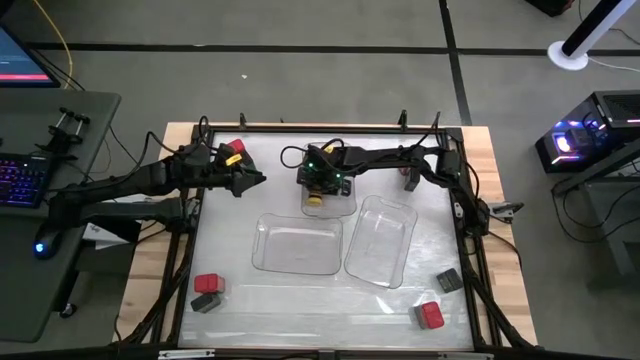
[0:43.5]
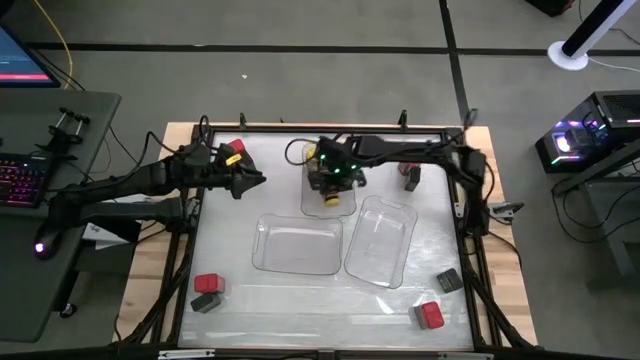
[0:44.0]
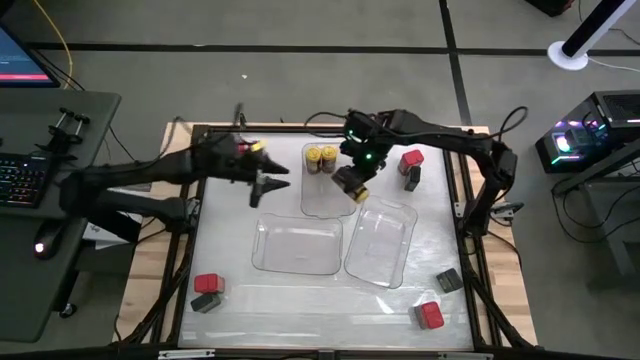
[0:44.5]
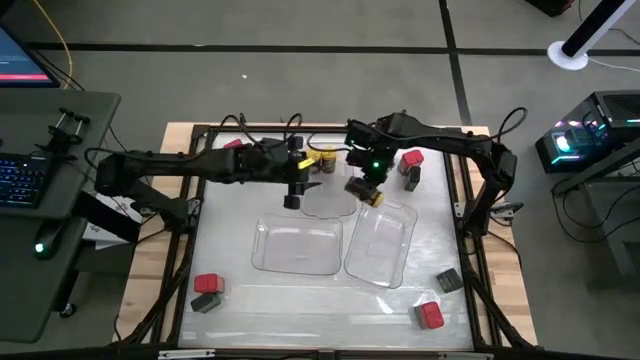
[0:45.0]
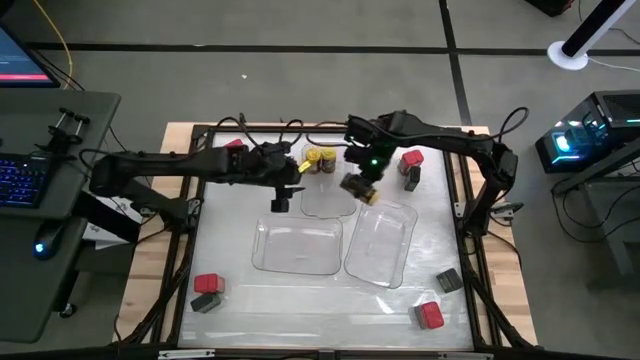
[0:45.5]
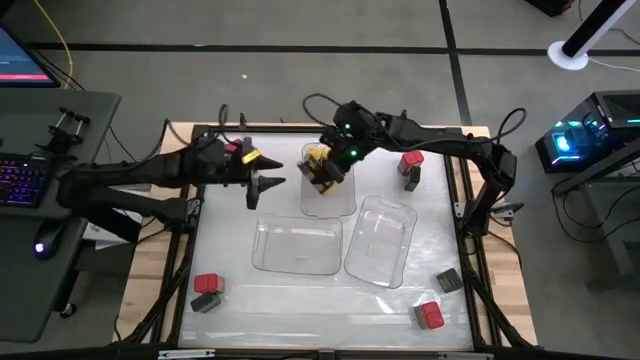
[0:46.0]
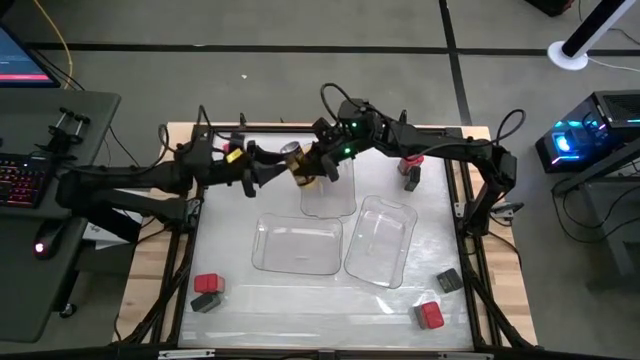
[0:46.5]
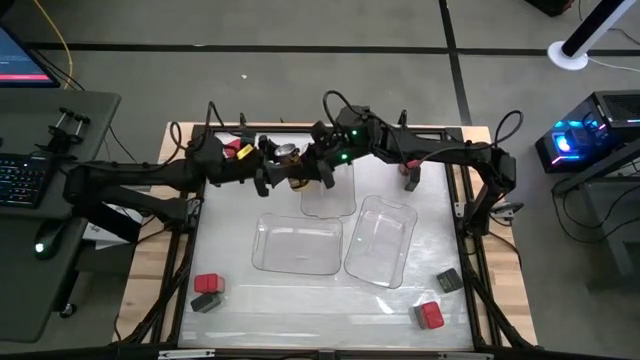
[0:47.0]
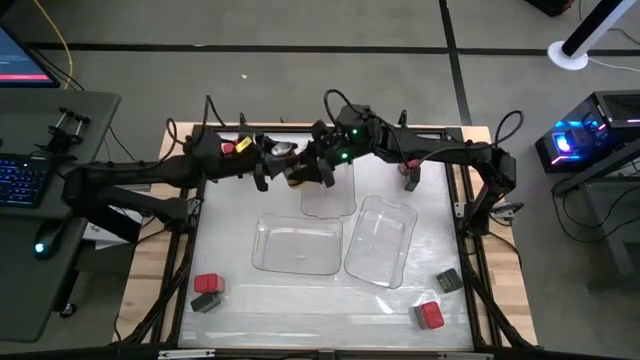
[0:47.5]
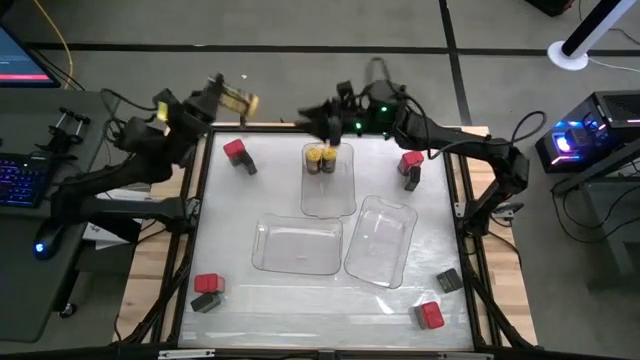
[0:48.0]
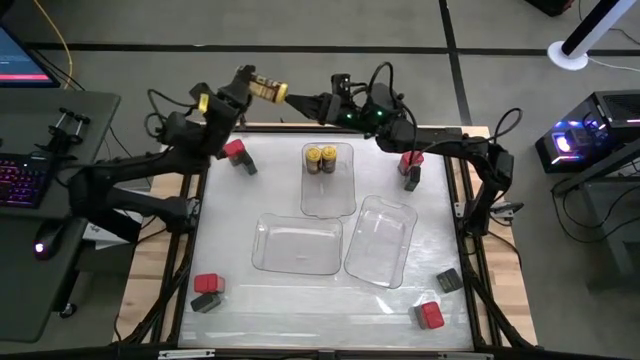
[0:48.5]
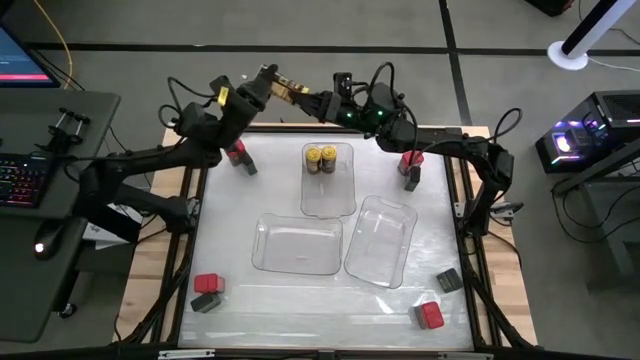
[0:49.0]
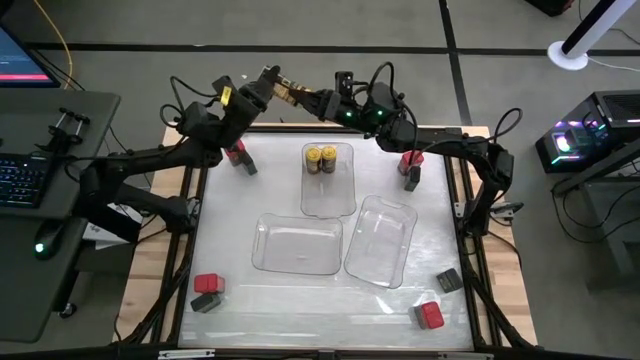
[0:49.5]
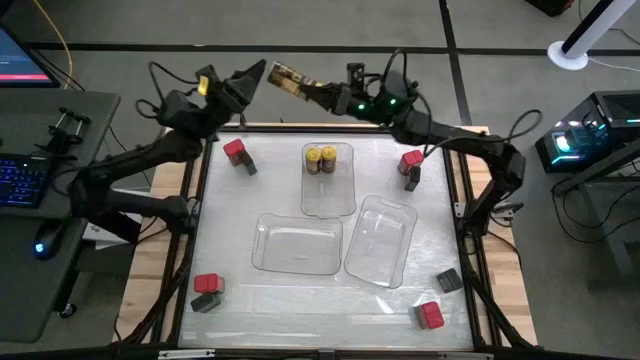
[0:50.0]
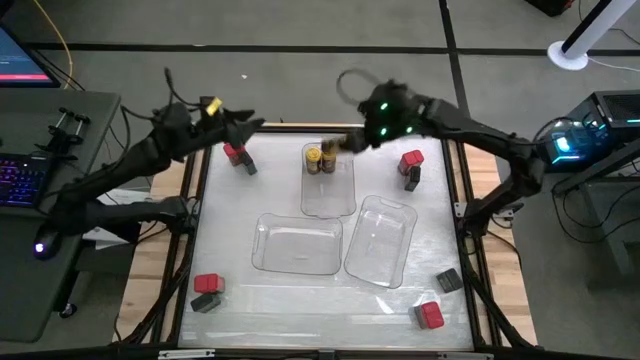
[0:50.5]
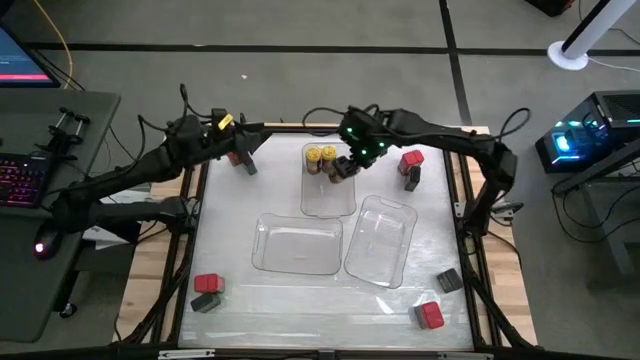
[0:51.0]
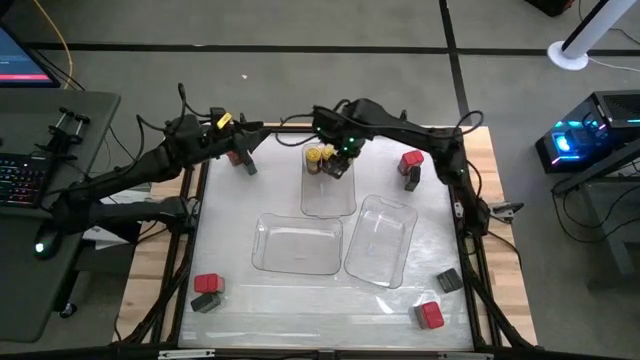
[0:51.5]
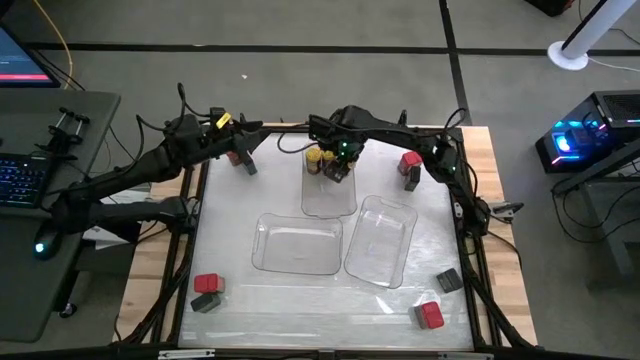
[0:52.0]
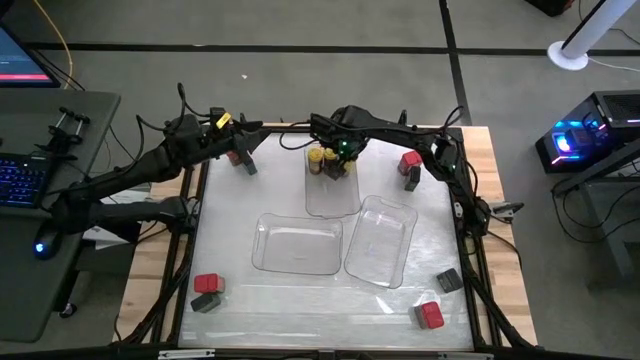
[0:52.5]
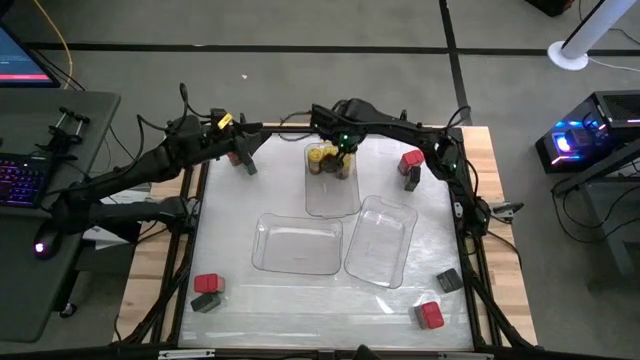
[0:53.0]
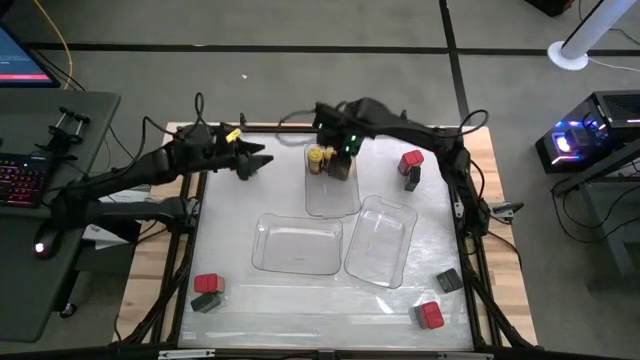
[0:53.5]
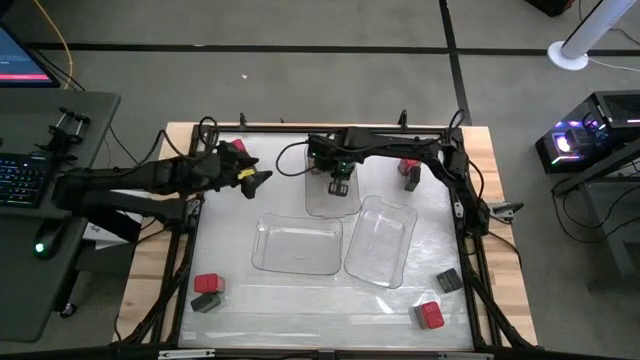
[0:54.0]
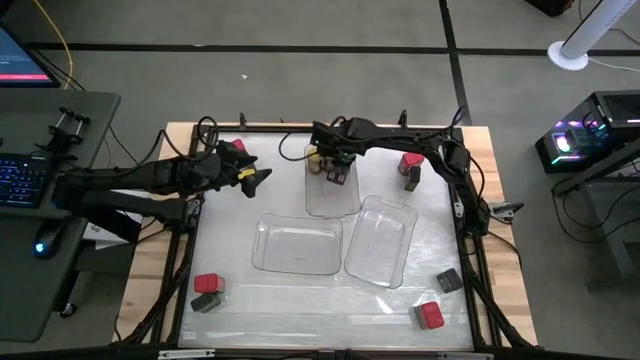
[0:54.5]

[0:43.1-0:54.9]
Task: Sort spices by type
Put the yellow seasoning bottle into the top transparent bin

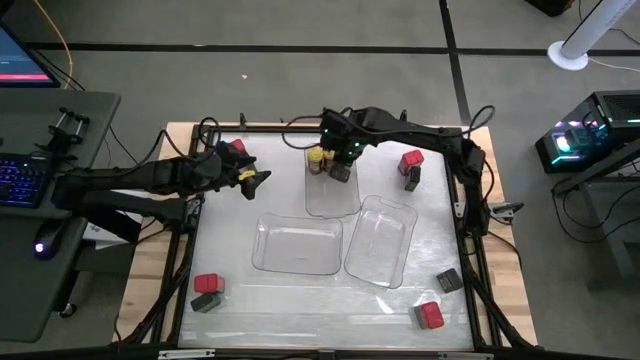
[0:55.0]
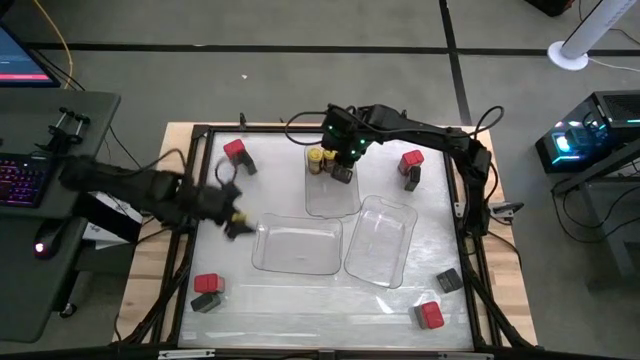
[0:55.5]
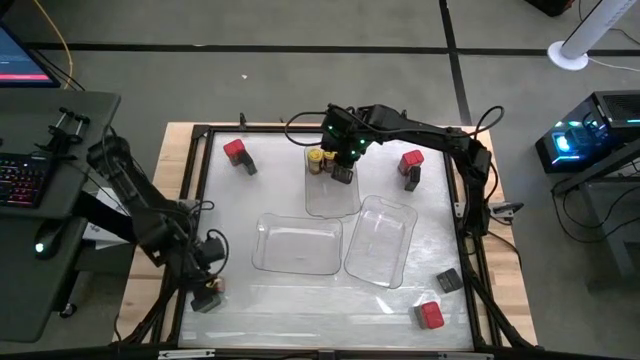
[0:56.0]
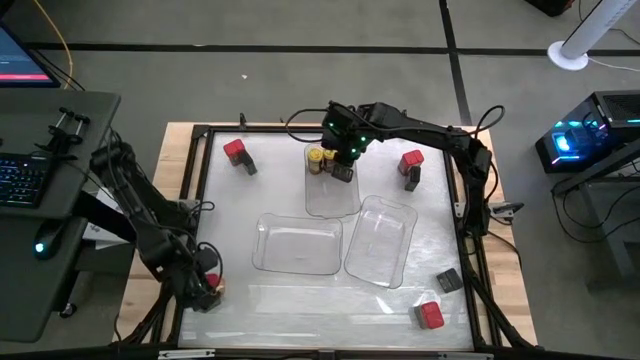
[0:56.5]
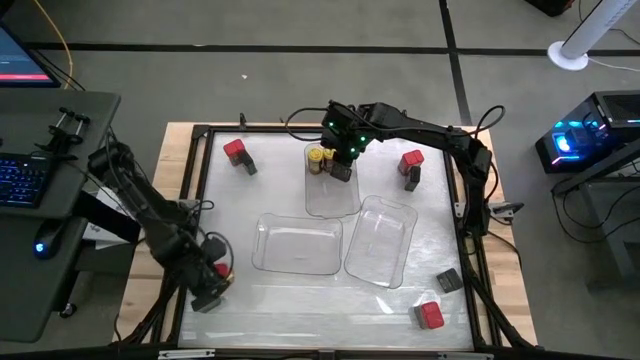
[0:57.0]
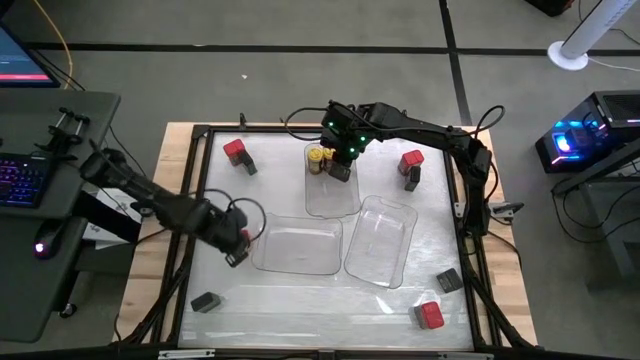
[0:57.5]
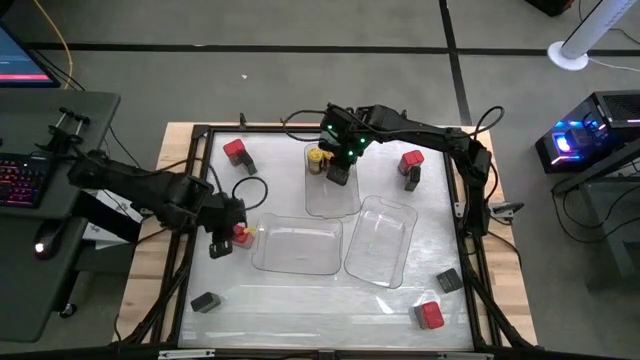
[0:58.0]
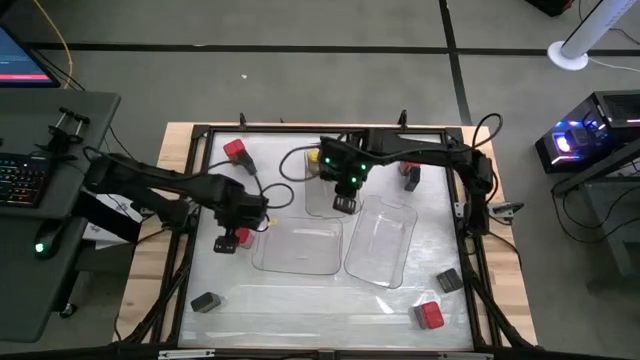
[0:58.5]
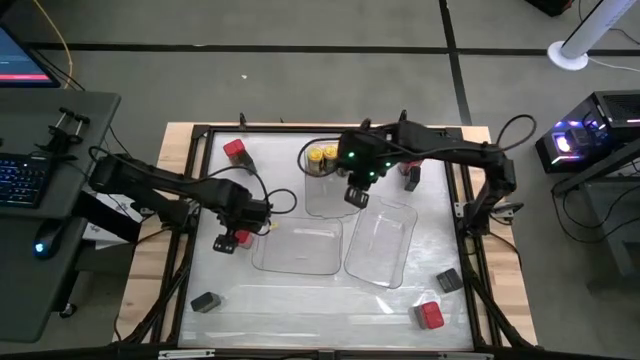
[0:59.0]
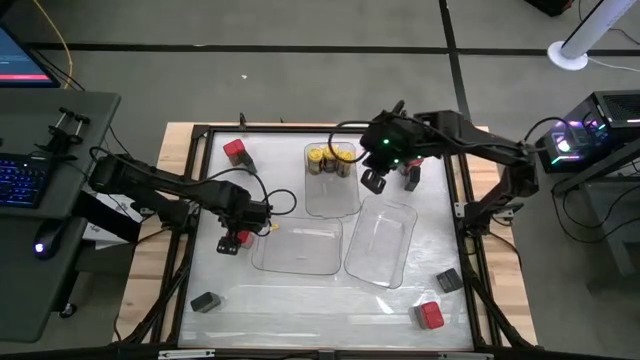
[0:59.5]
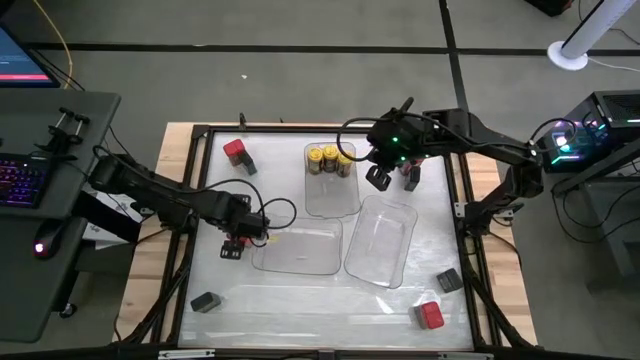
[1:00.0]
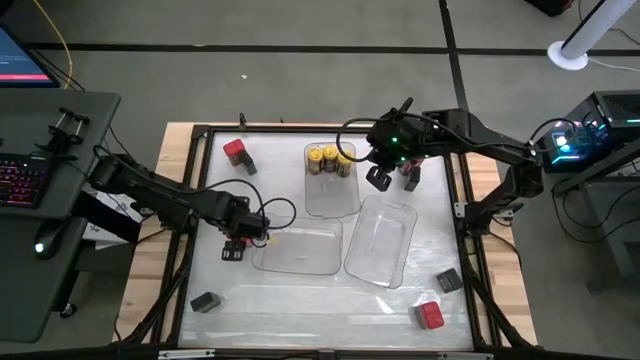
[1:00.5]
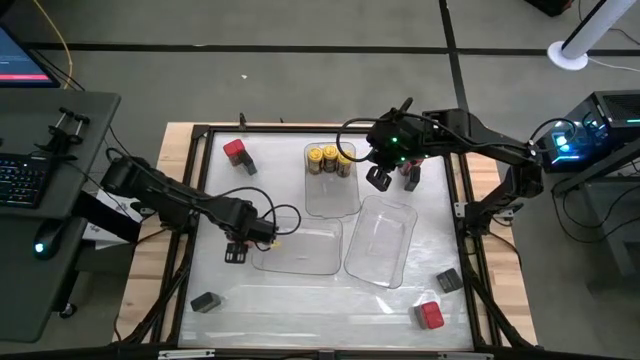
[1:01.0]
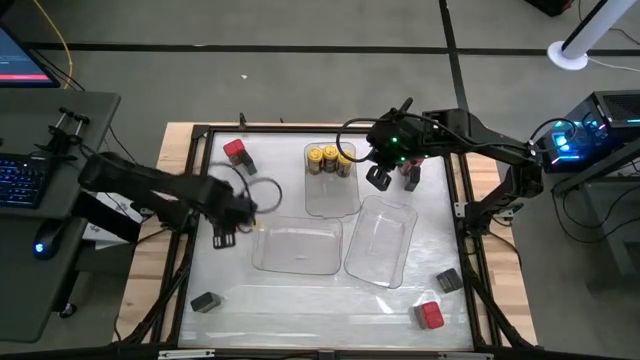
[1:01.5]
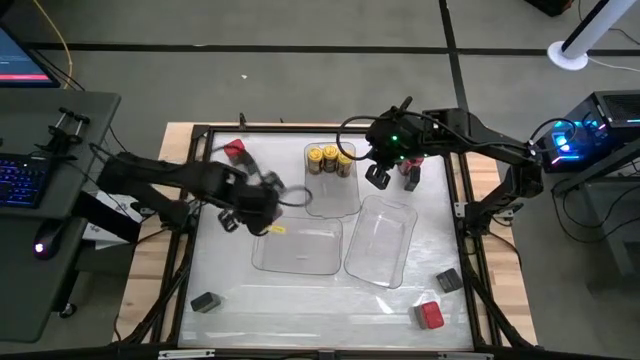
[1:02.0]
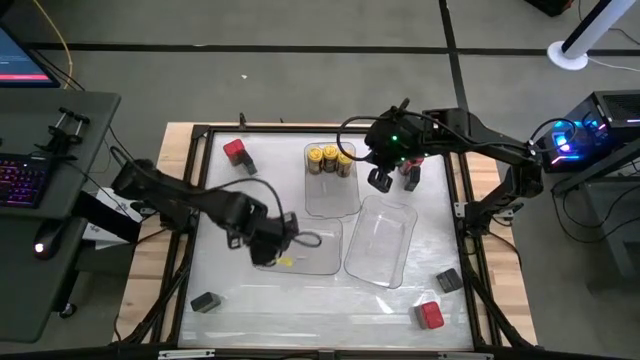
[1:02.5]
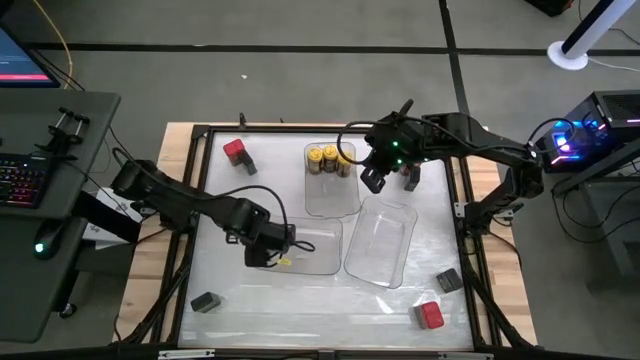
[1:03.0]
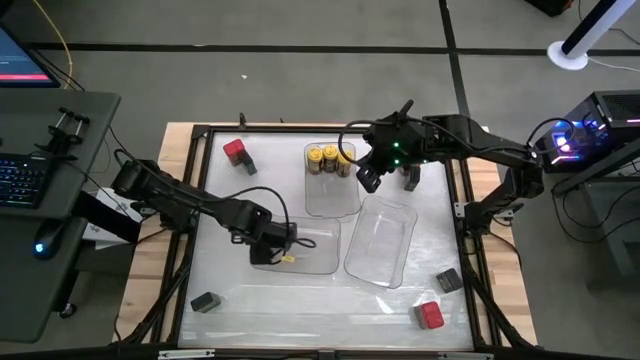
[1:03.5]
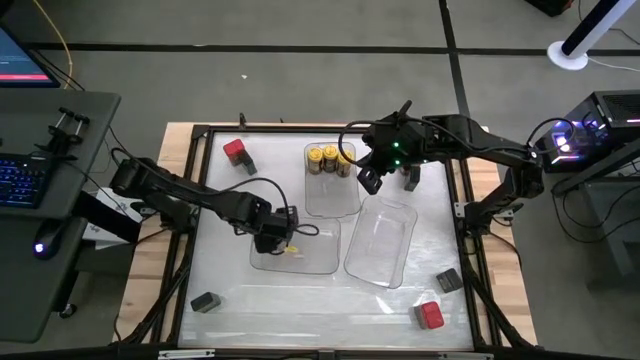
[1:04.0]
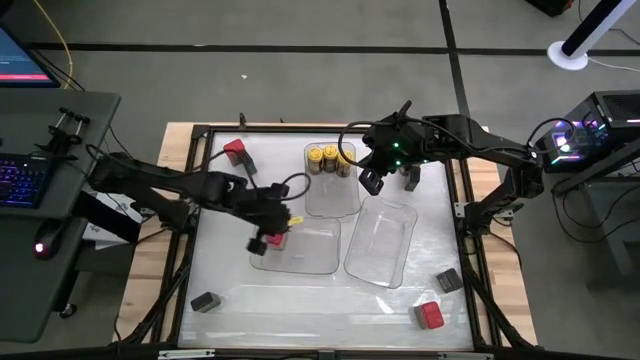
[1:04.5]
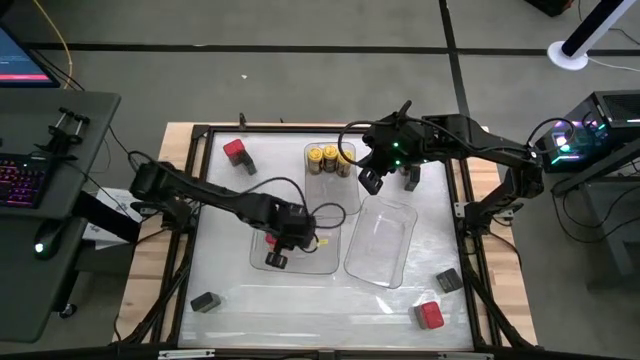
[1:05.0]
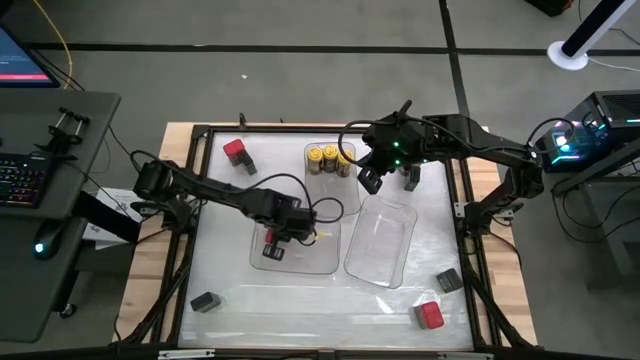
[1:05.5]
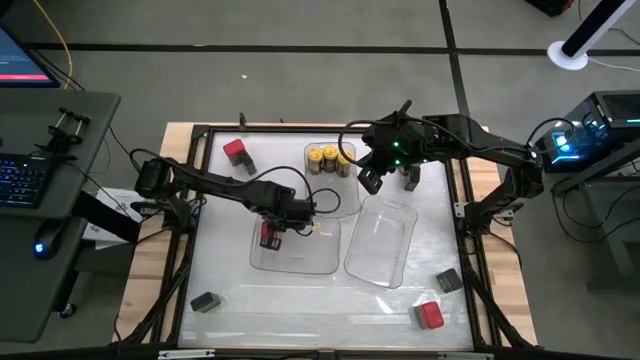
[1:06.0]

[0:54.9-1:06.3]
Put the left bottom red seasoning can into the left transparent bin

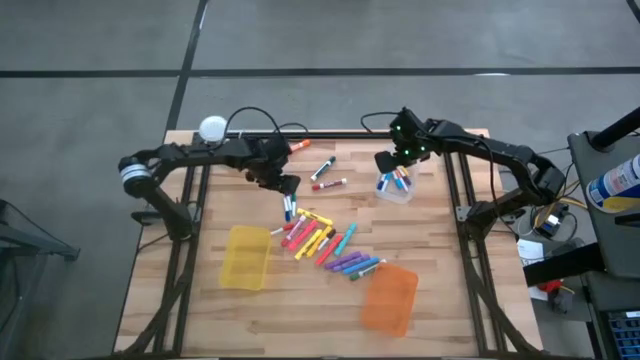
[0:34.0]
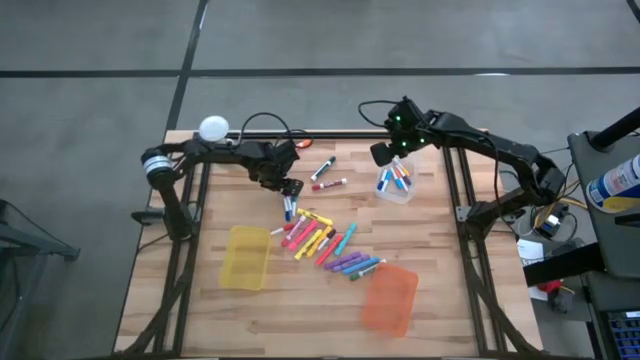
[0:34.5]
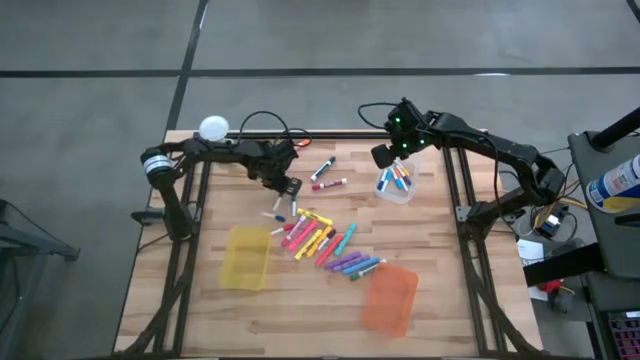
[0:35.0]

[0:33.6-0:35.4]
Task: Pick & Place Markers
Put the small violet highlighter pen into the transparent bin
